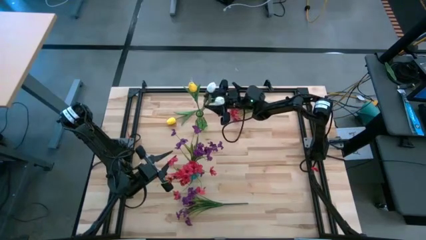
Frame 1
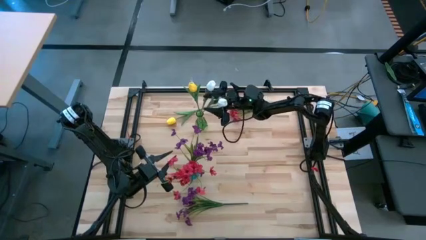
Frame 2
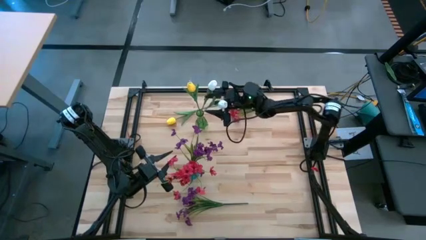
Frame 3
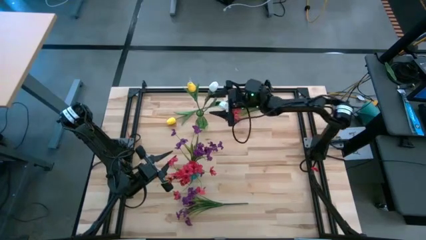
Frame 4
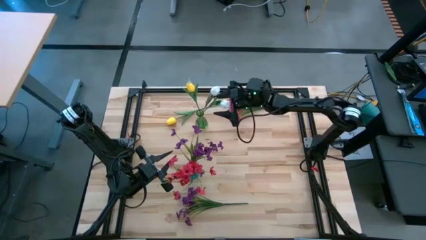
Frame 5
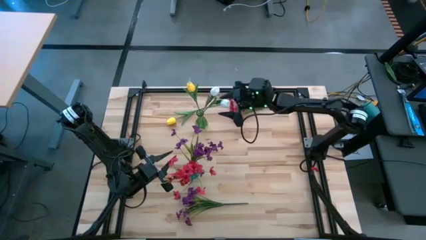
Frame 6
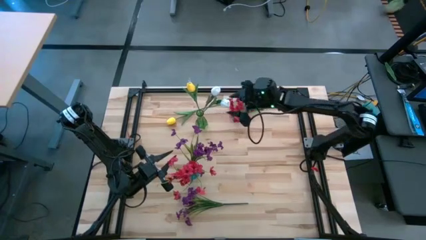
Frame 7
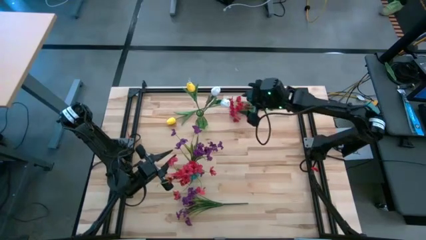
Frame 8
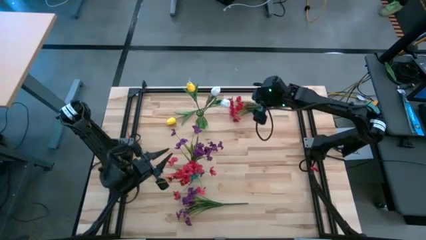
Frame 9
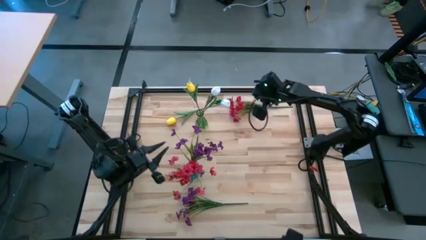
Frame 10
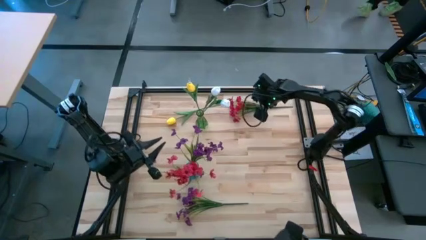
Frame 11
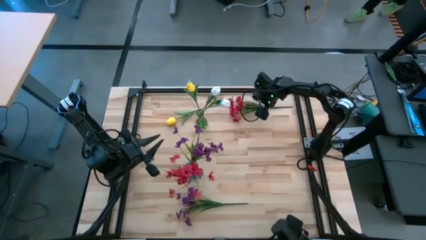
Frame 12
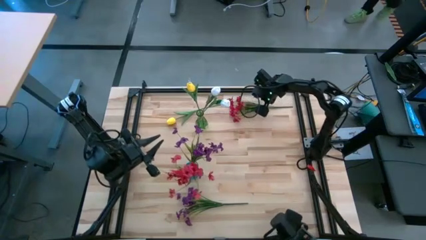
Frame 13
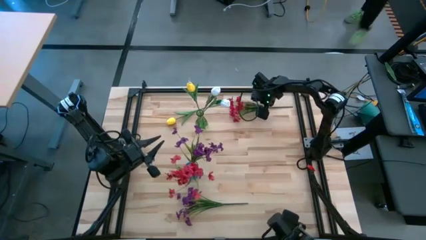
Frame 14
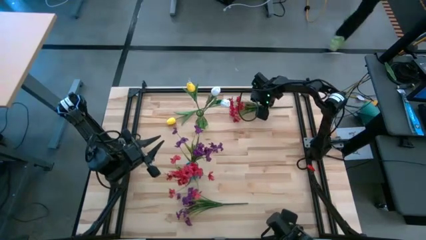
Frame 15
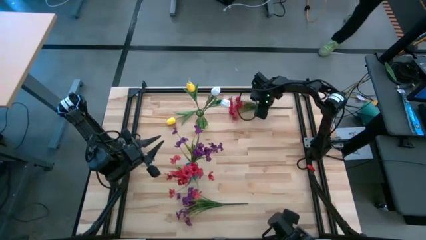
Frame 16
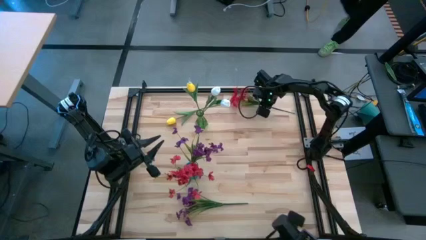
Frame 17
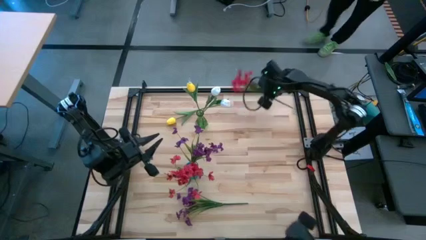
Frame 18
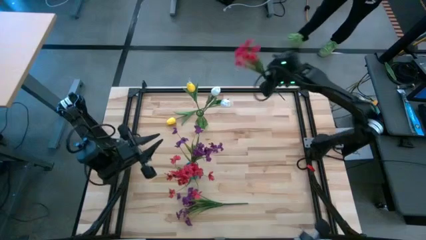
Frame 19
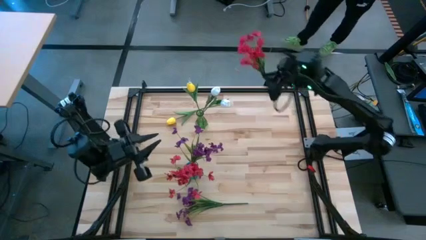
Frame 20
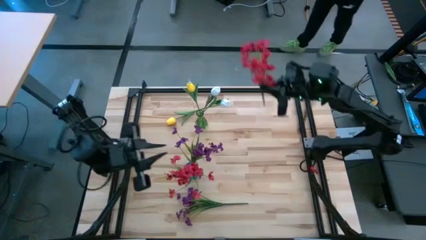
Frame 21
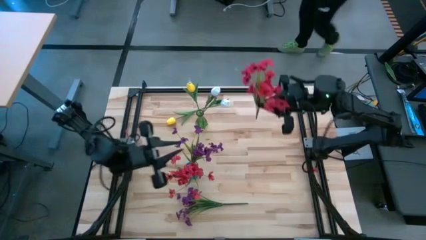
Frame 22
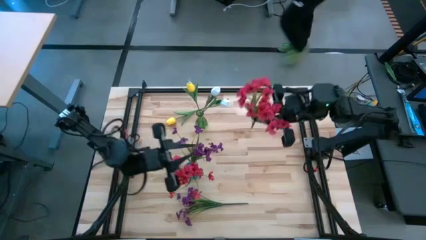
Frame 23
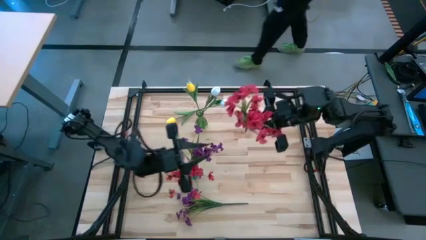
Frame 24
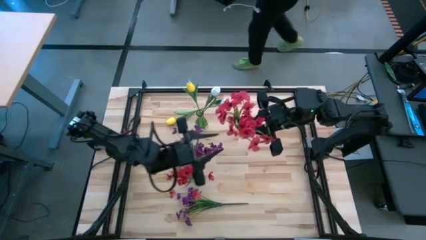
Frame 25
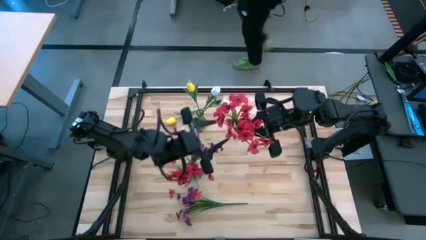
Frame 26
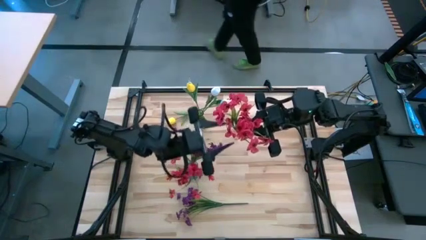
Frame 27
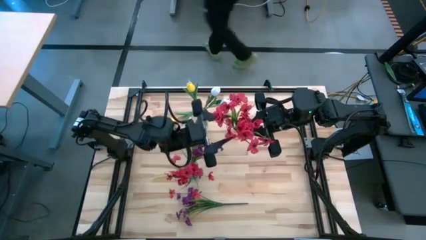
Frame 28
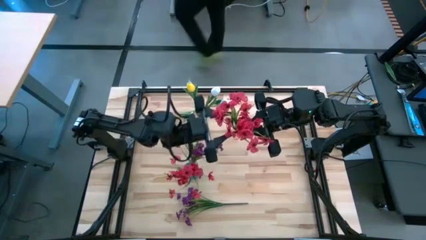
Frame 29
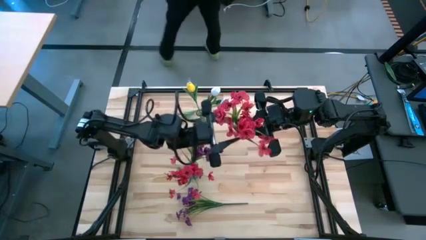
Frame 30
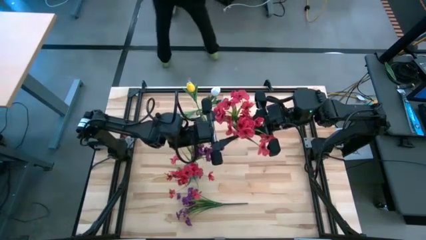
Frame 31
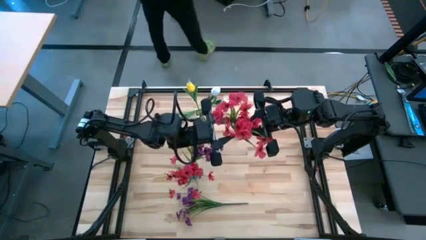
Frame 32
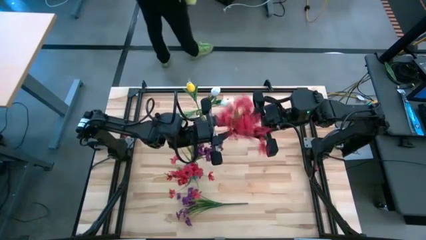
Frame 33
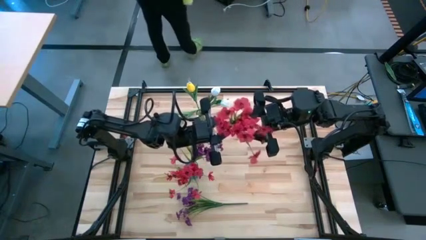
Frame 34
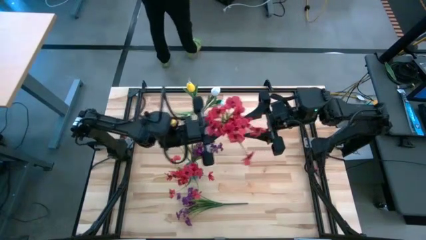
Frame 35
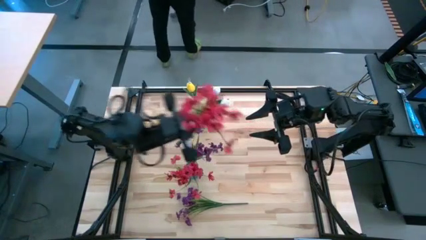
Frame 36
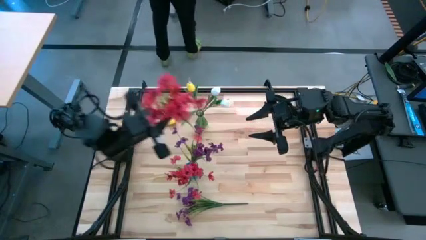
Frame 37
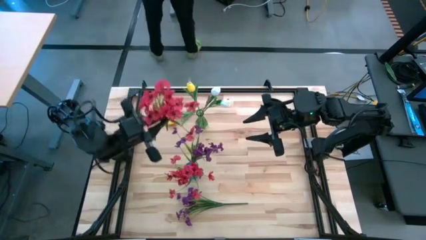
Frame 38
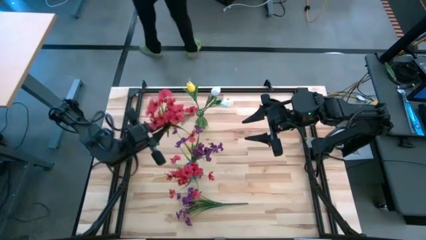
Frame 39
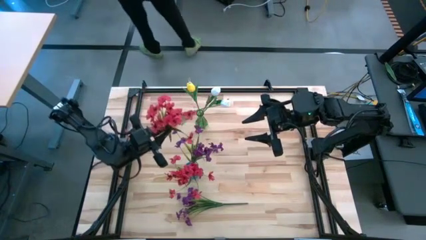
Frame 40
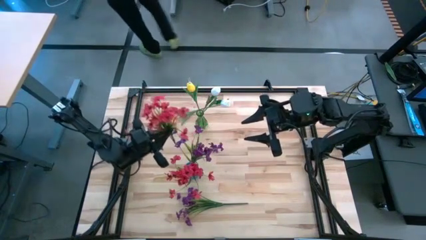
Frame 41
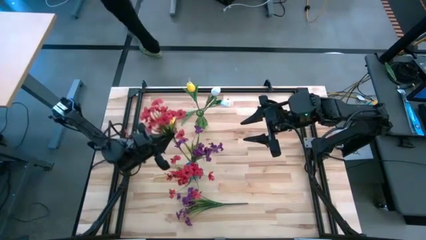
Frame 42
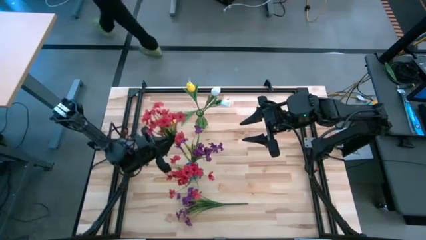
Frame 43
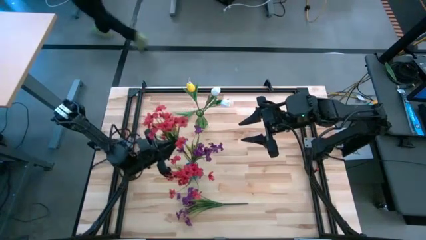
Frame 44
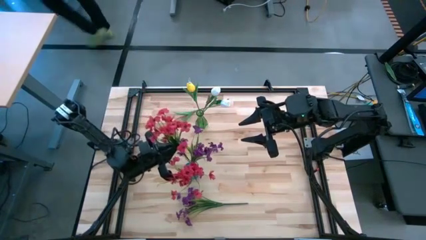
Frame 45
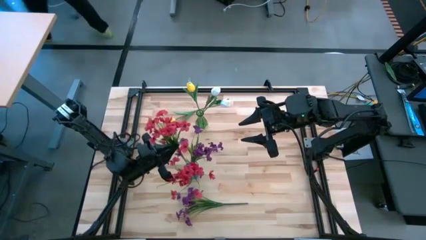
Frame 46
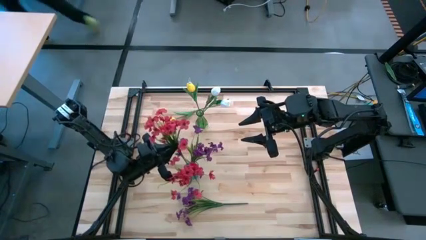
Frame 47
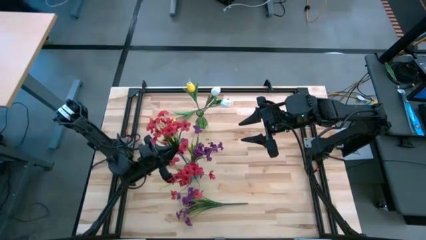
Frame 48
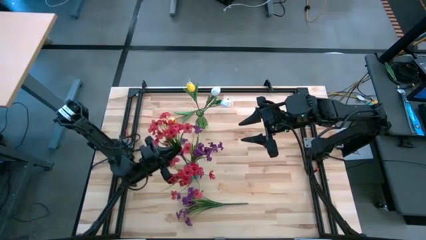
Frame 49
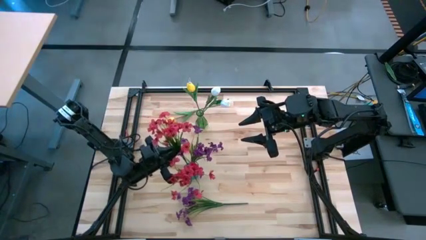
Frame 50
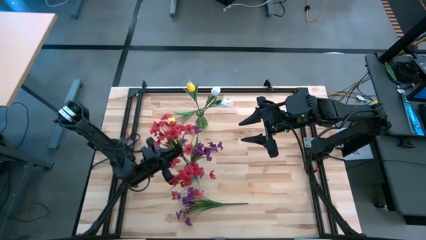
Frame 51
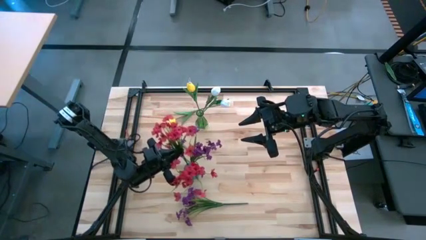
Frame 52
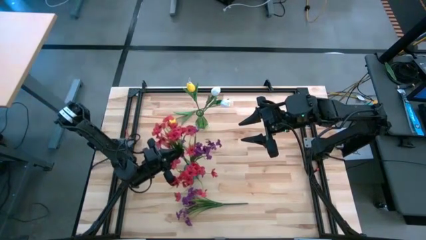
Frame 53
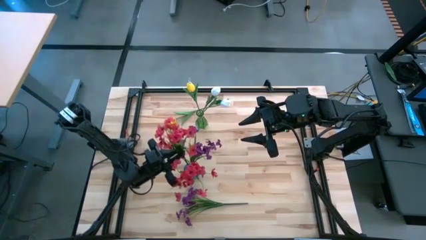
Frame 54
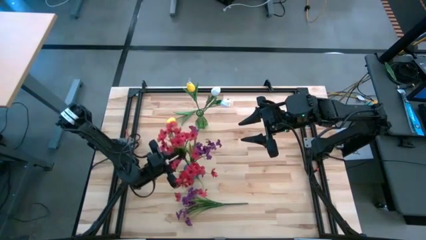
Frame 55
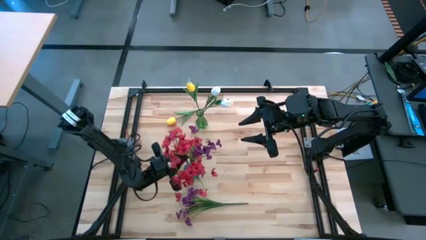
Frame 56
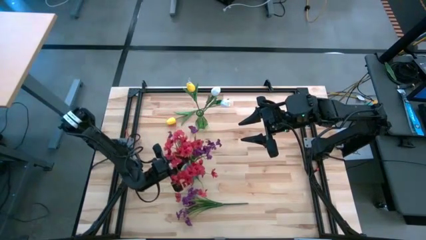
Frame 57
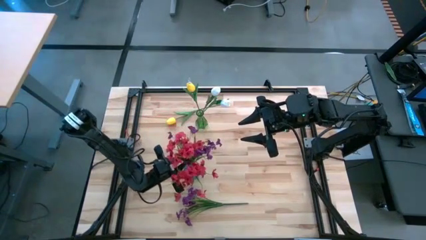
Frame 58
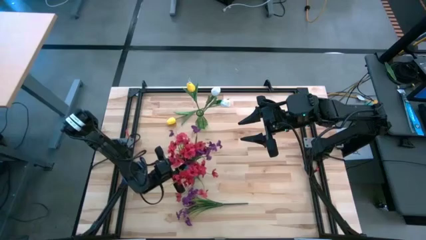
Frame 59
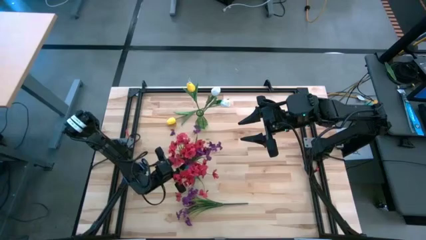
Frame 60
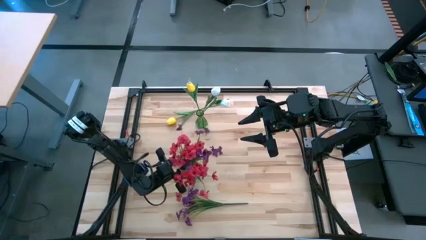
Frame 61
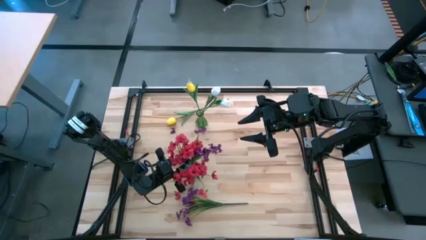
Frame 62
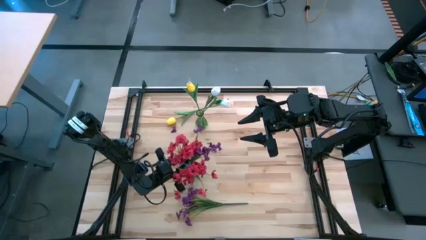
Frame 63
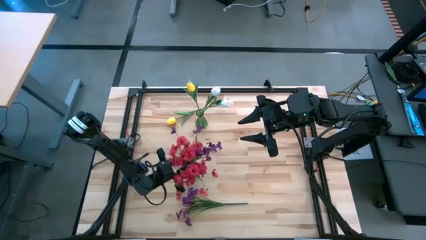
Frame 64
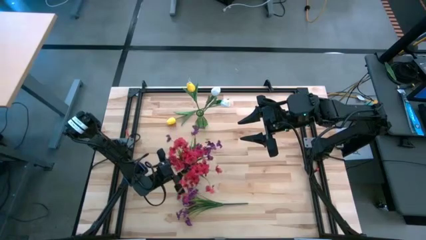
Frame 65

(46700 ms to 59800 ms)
Task: Sort flowers into vase by color
Put the red flowers into the blue vase
